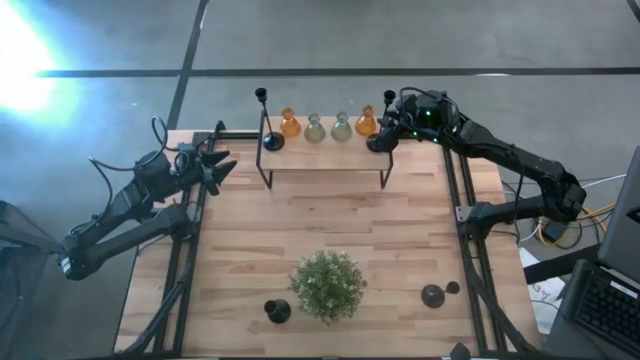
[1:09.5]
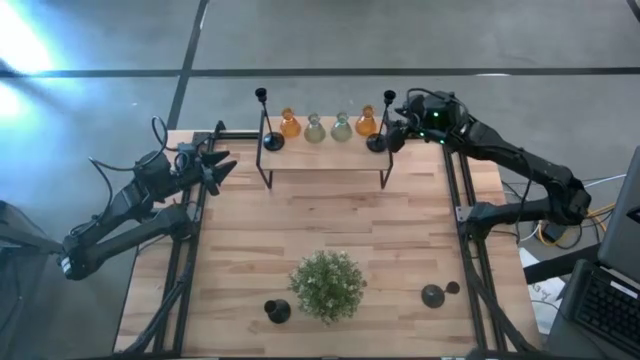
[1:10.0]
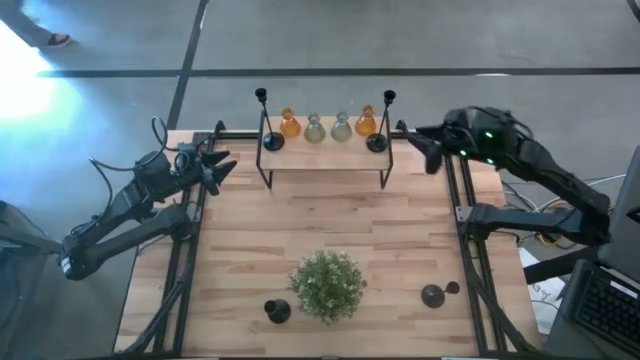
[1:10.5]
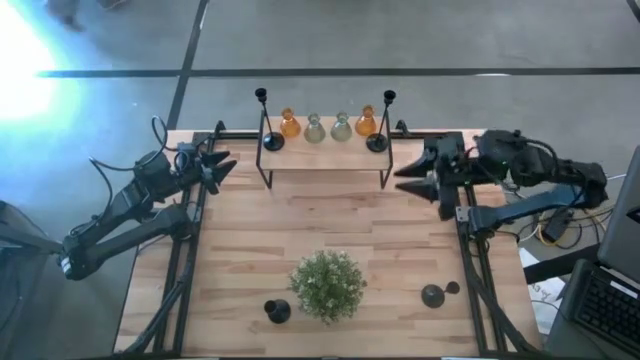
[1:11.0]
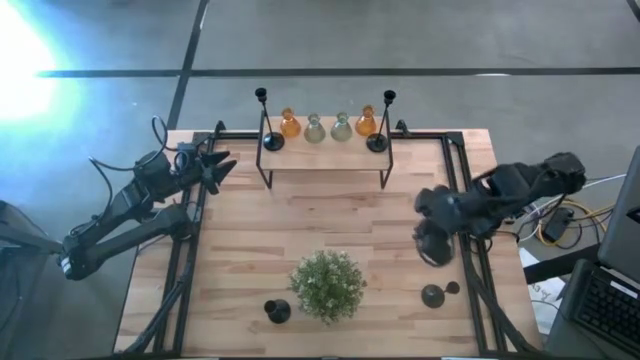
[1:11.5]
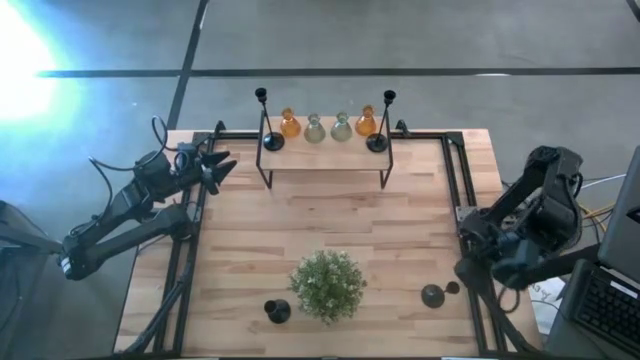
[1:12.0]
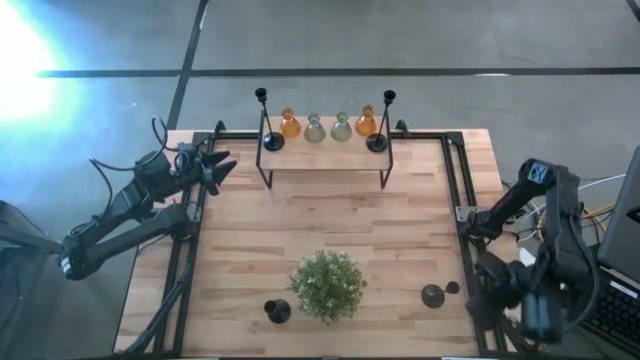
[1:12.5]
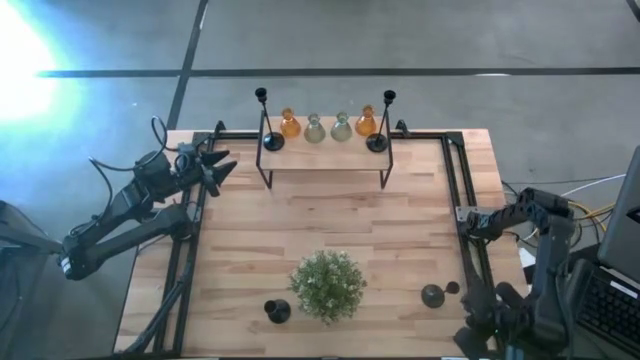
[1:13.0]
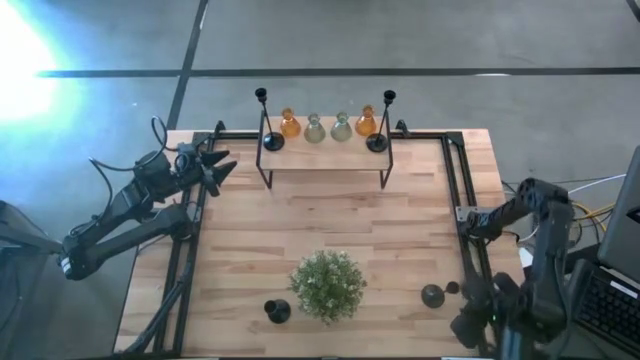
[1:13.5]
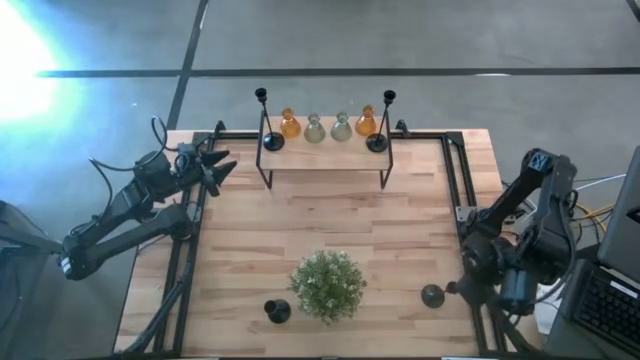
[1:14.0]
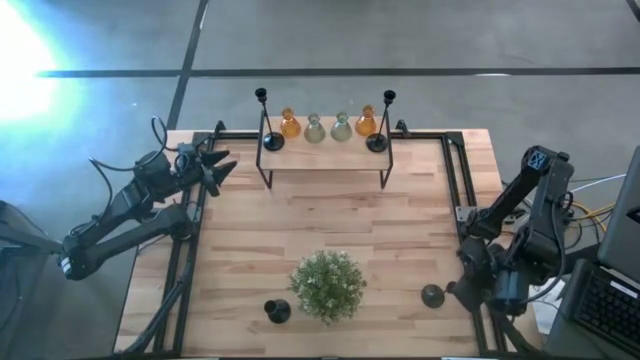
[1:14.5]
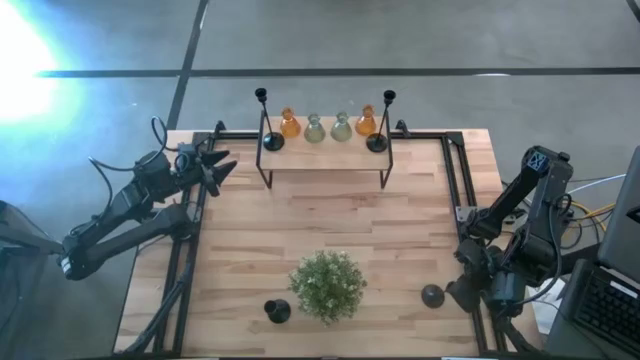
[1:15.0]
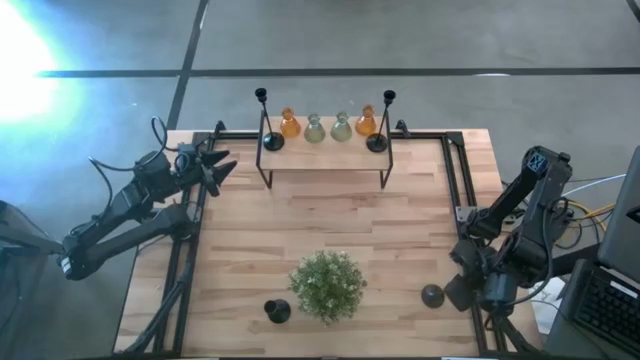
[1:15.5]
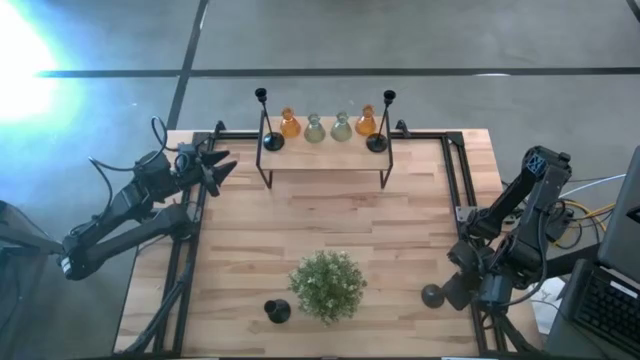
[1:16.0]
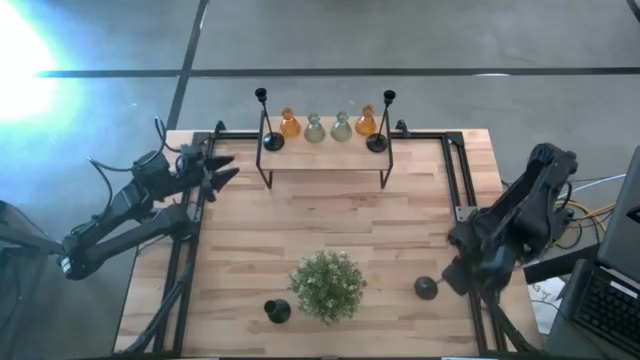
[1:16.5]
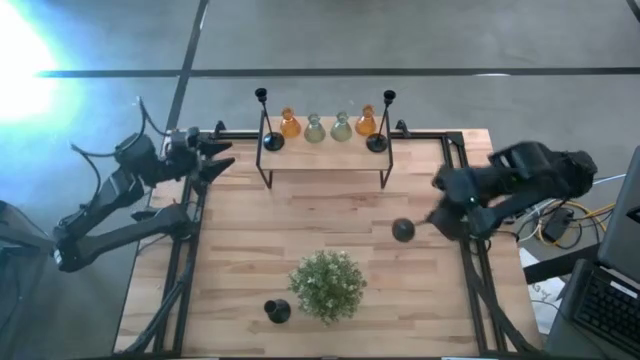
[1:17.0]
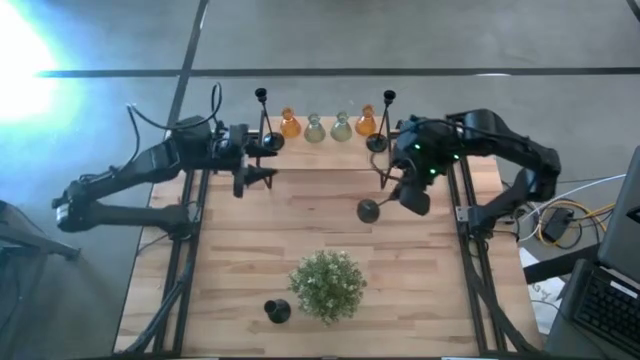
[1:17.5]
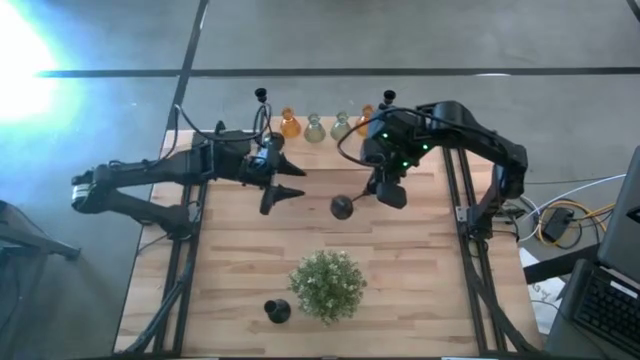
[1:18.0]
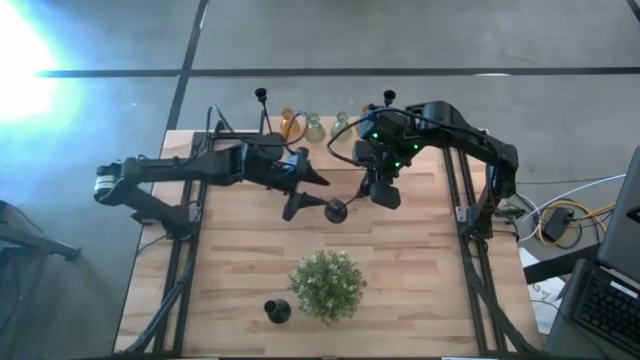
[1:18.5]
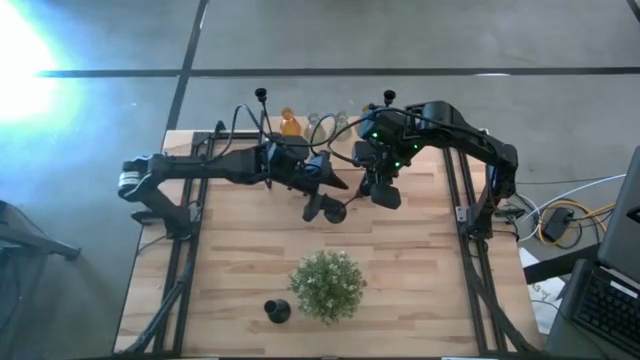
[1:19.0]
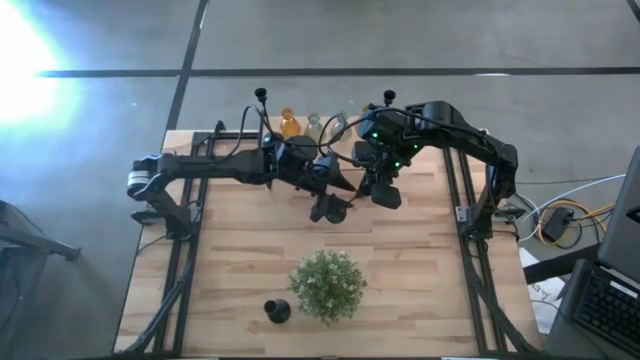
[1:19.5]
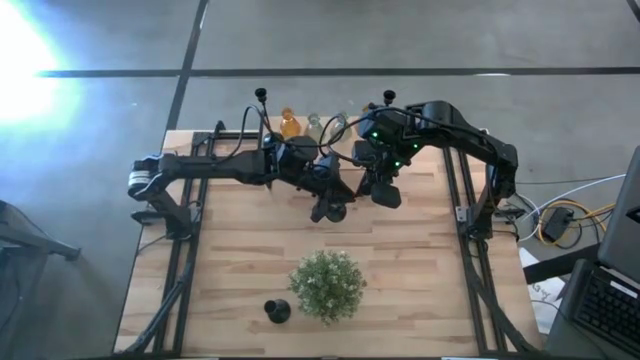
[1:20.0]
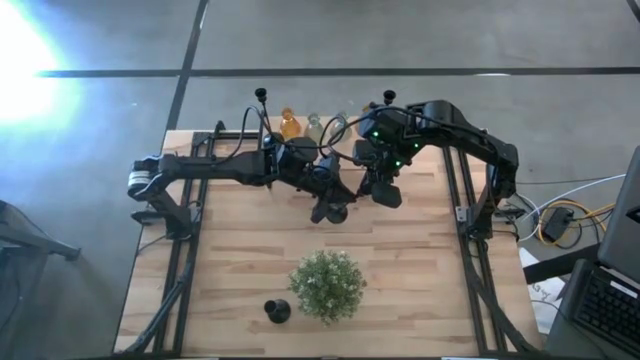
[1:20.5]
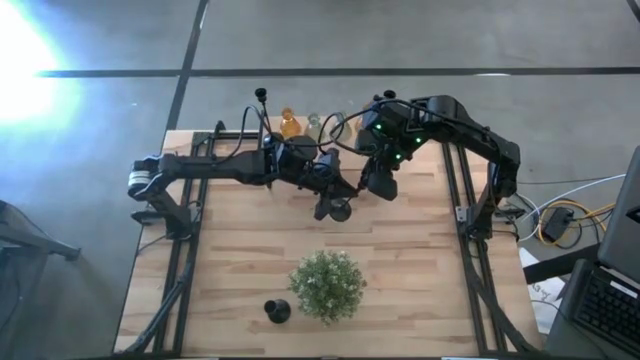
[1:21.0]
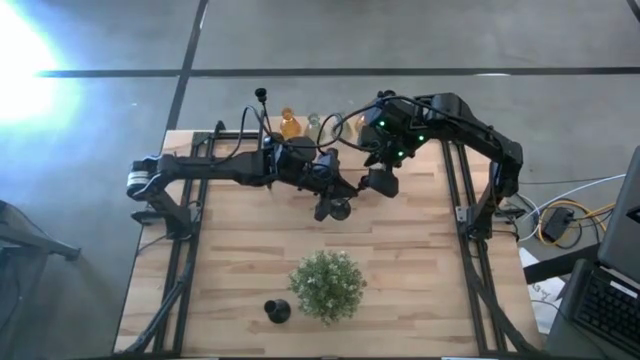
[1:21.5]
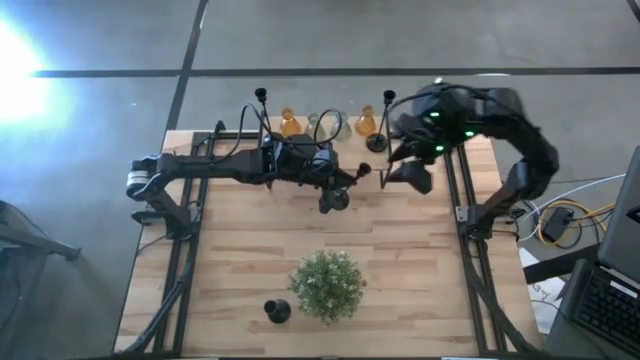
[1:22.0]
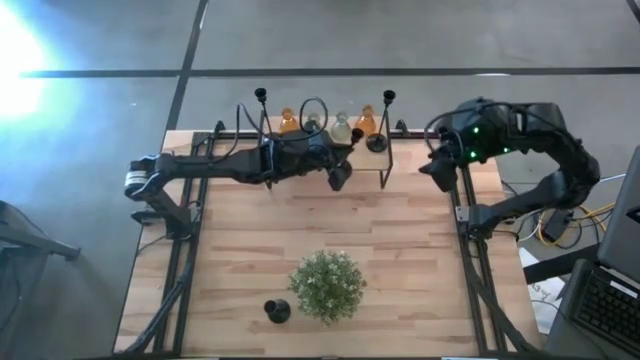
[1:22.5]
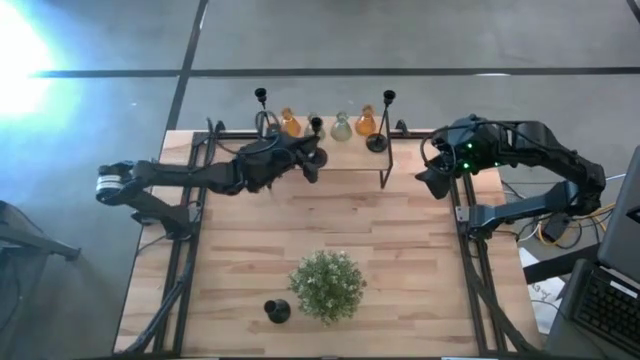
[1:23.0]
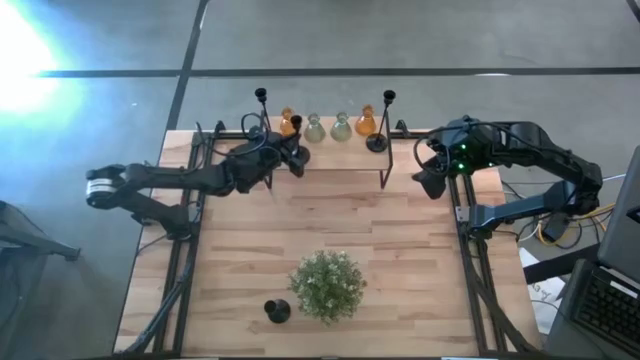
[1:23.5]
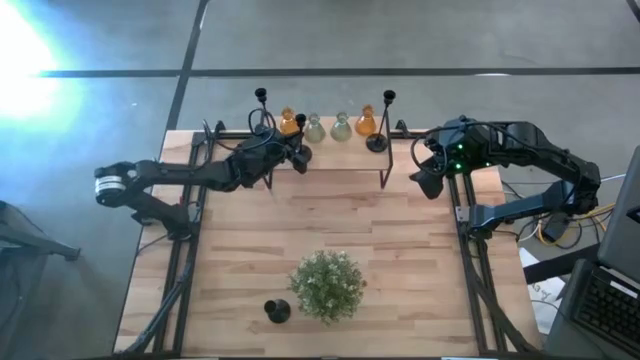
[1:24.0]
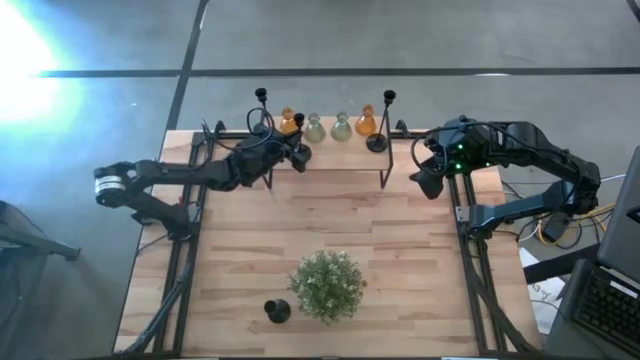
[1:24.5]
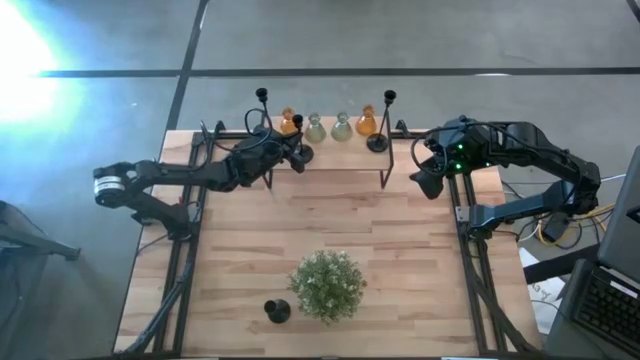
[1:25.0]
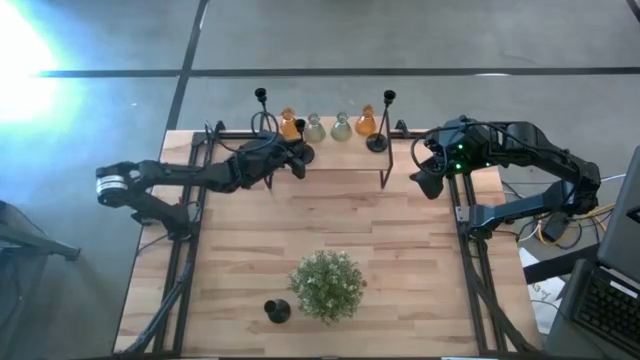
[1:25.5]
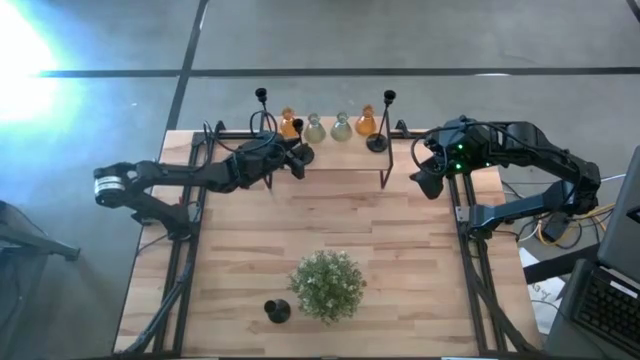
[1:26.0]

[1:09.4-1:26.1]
Task: Pick & Place candle stick holders
Put the black candle holder on the shelf

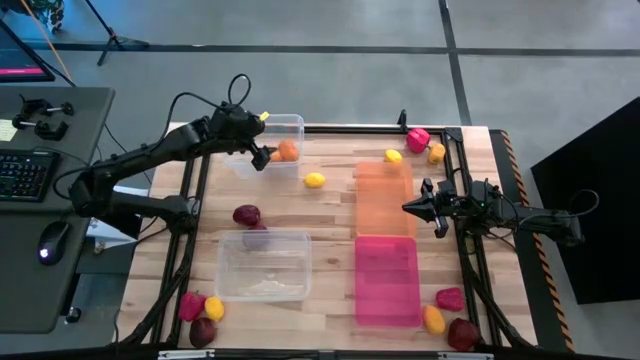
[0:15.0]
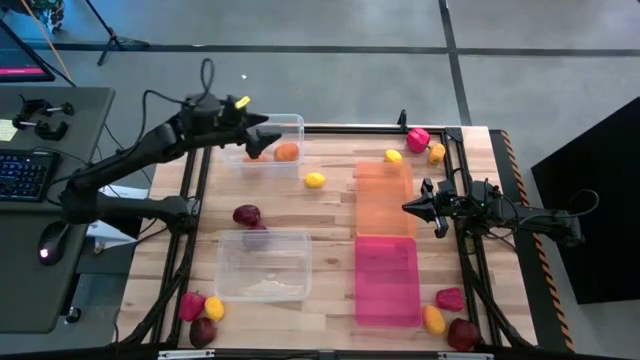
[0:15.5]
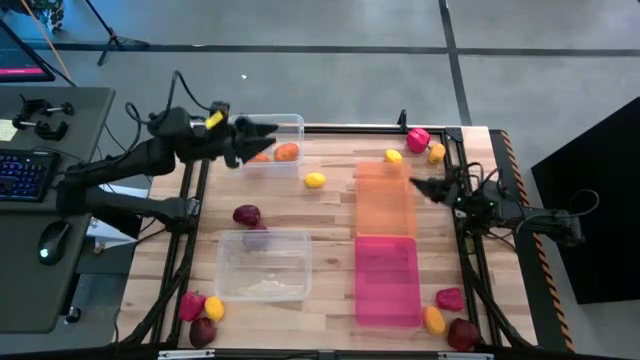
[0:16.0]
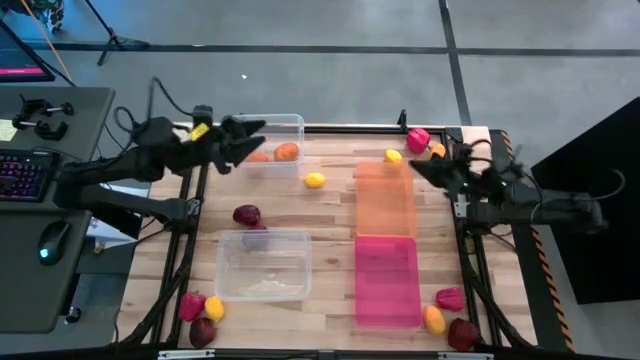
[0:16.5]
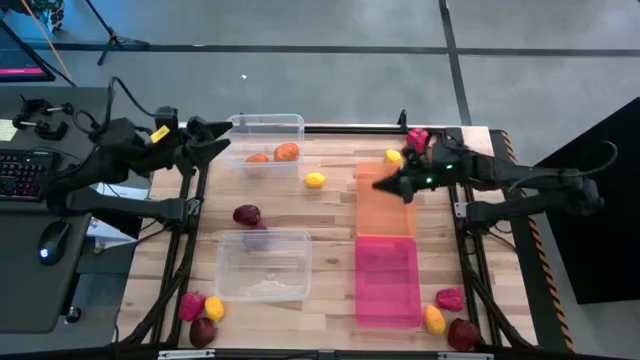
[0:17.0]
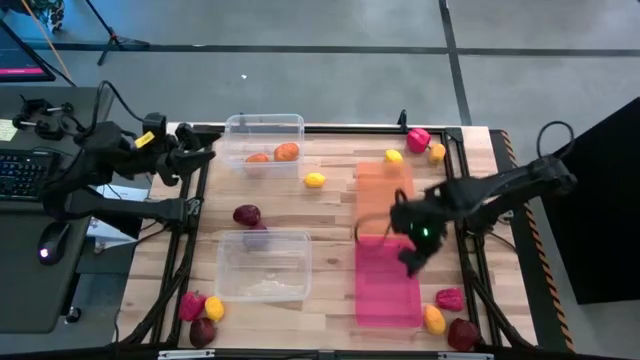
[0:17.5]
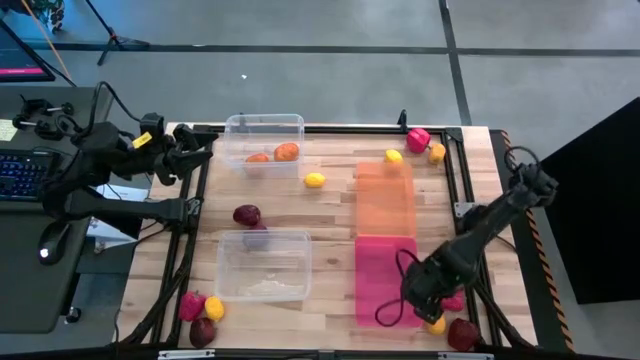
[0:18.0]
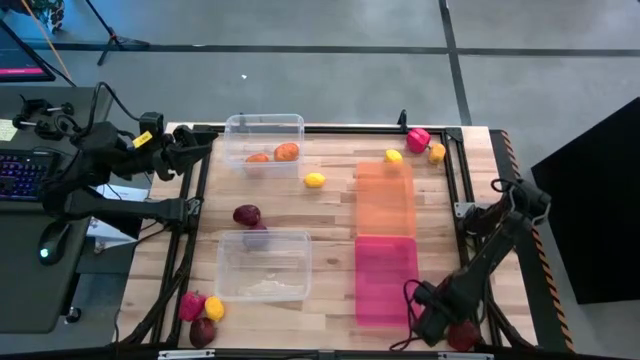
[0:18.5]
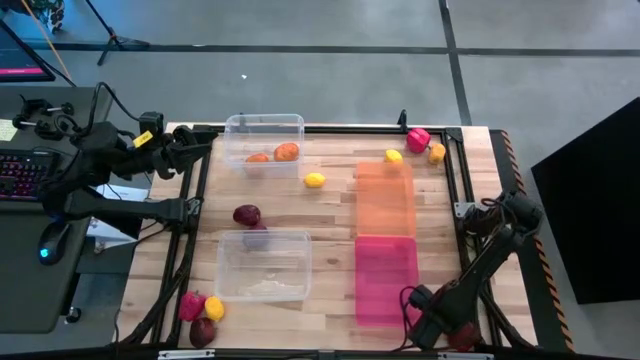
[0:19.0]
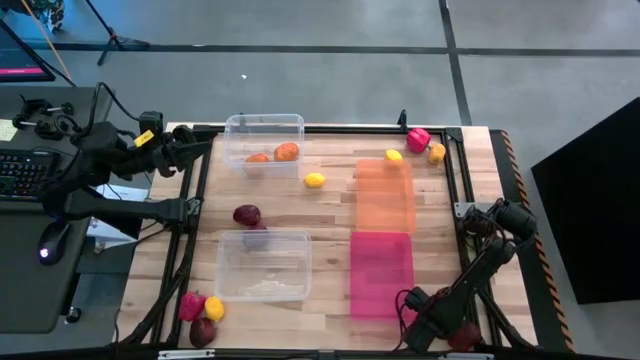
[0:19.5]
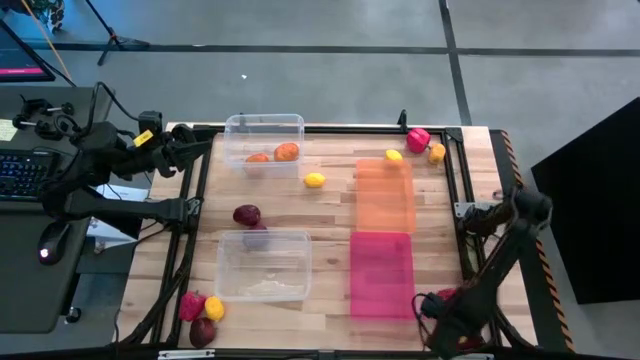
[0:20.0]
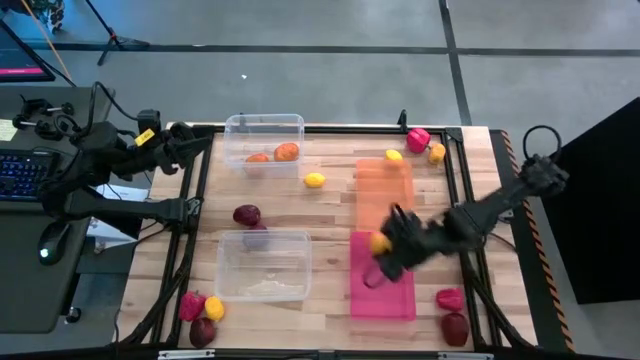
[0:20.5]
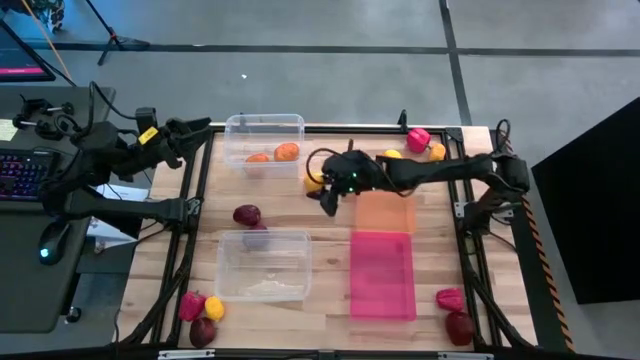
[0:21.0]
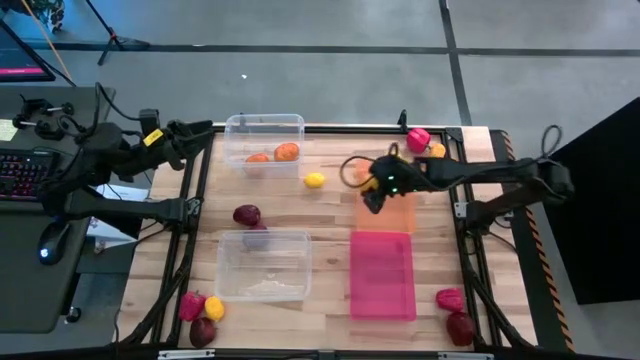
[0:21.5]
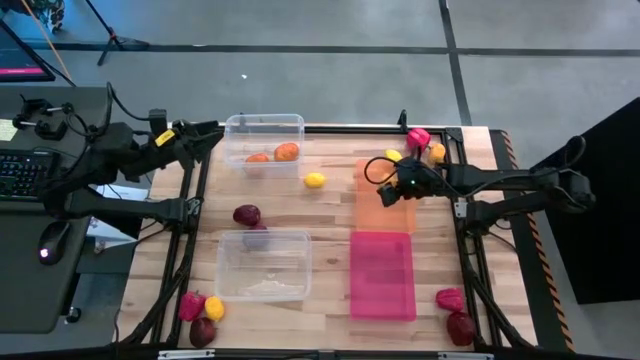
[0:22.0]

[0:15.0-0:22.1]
Task: Sort produce into baskets
Put the yellow lemon into the orange bin
